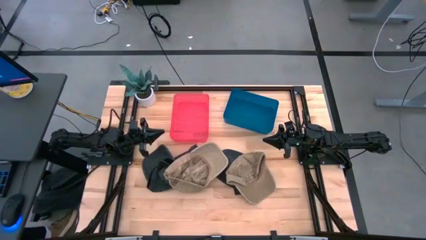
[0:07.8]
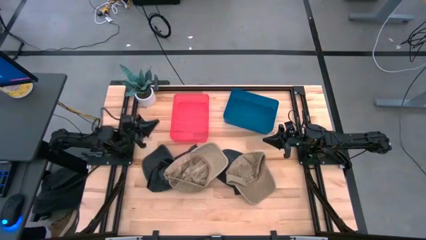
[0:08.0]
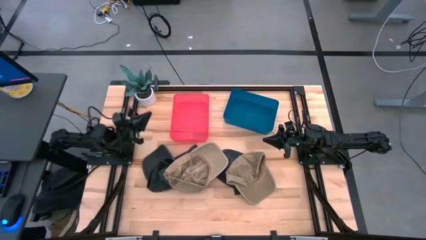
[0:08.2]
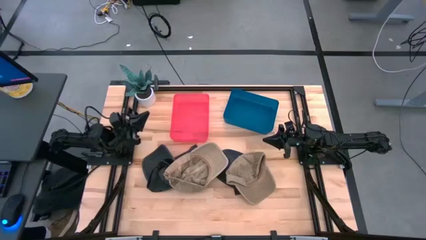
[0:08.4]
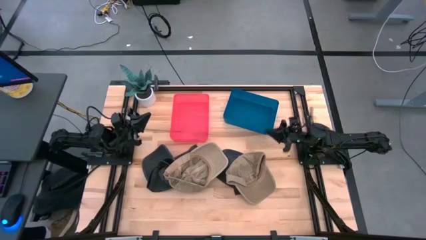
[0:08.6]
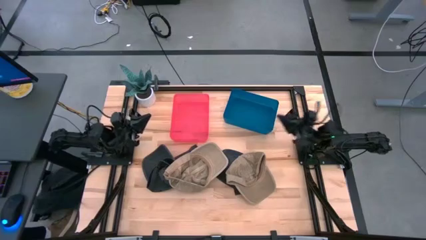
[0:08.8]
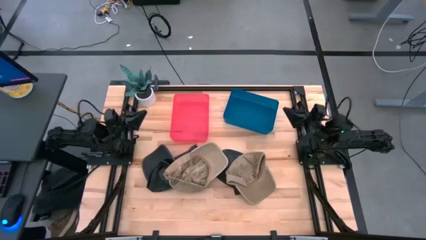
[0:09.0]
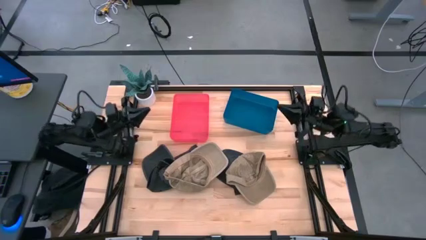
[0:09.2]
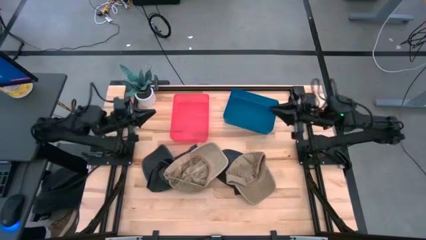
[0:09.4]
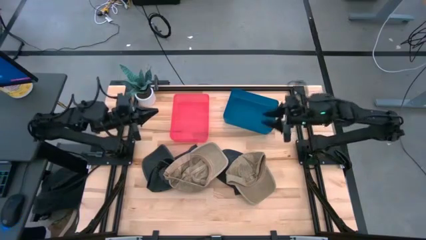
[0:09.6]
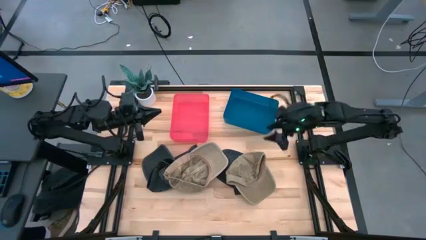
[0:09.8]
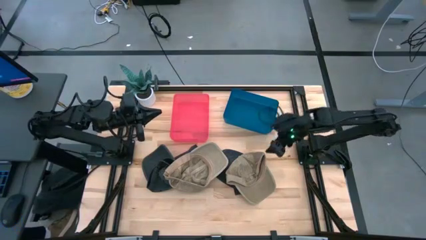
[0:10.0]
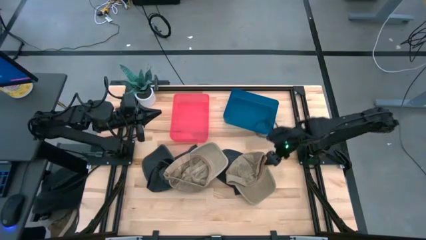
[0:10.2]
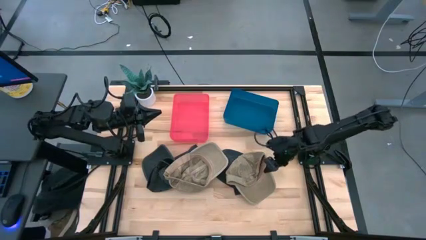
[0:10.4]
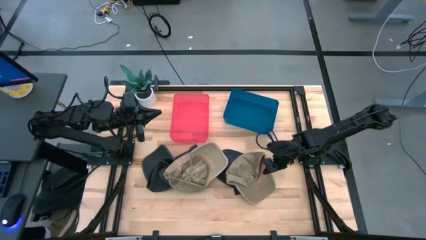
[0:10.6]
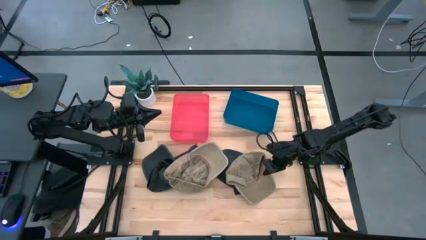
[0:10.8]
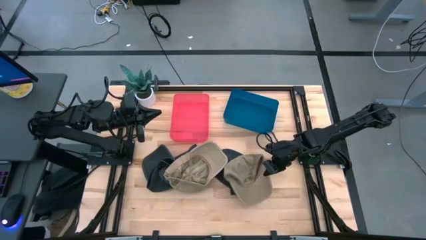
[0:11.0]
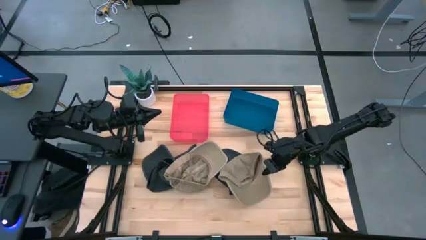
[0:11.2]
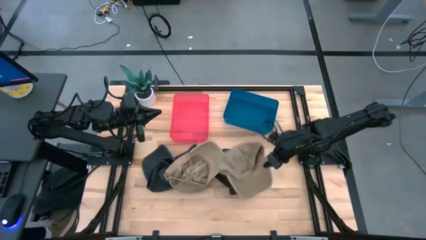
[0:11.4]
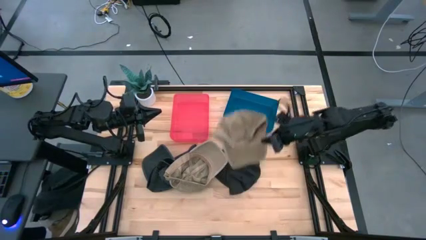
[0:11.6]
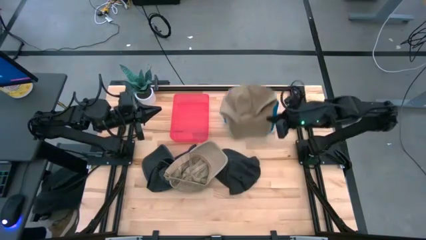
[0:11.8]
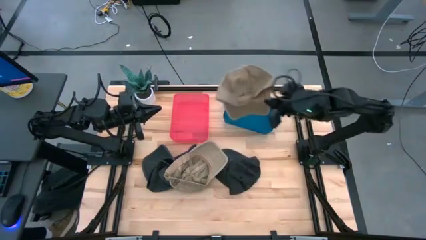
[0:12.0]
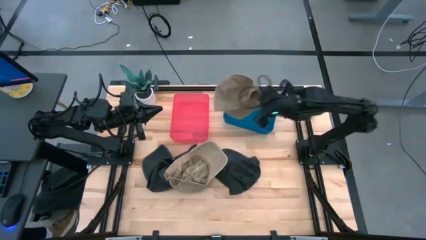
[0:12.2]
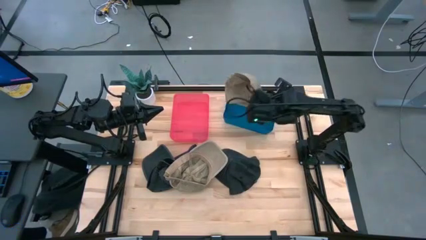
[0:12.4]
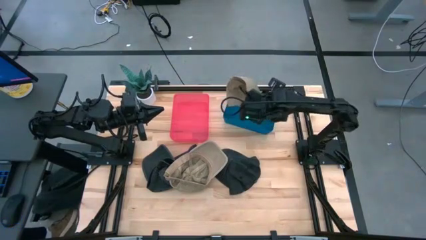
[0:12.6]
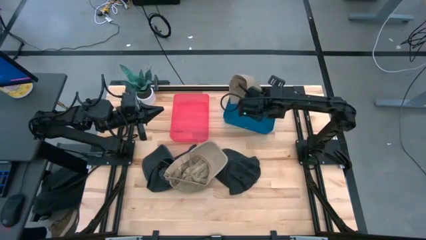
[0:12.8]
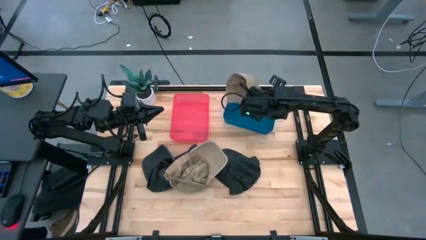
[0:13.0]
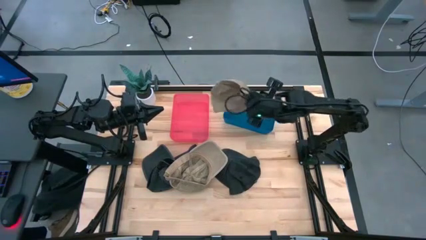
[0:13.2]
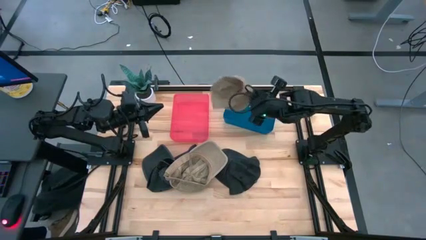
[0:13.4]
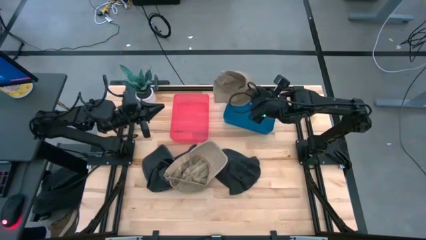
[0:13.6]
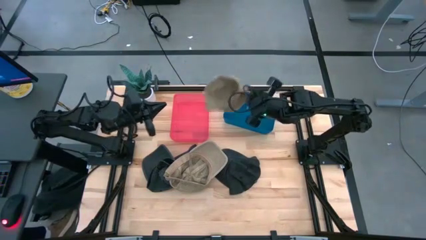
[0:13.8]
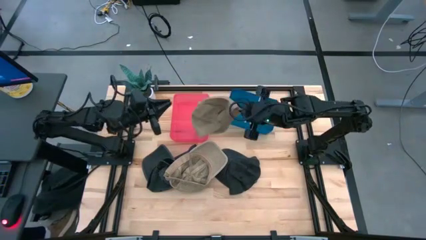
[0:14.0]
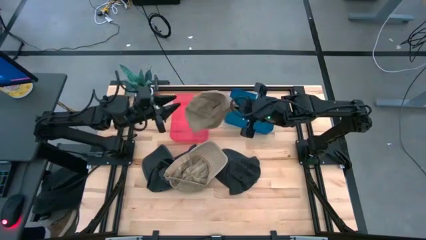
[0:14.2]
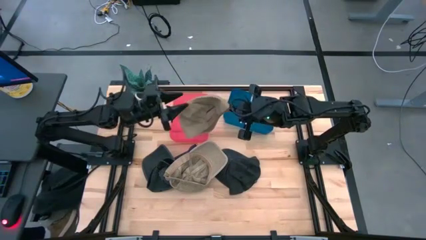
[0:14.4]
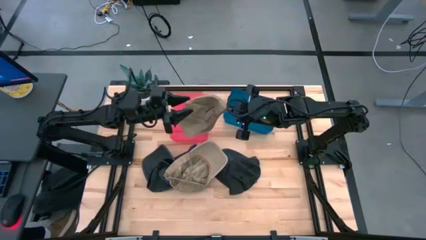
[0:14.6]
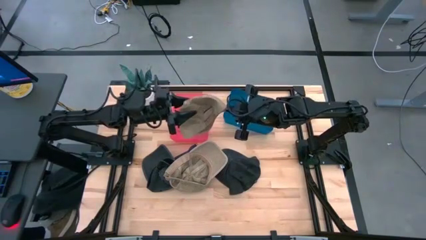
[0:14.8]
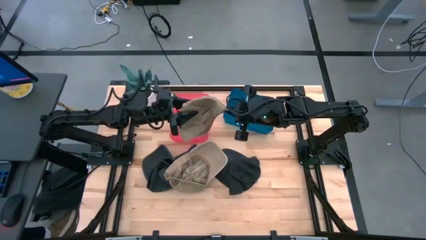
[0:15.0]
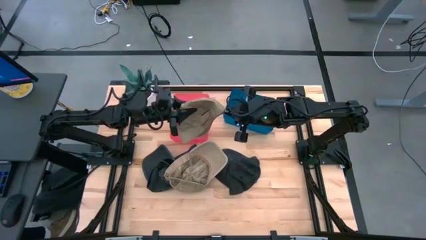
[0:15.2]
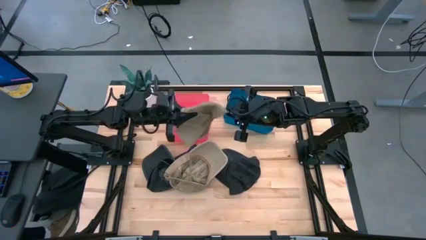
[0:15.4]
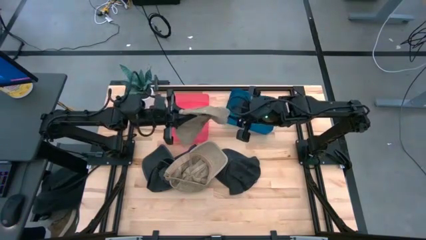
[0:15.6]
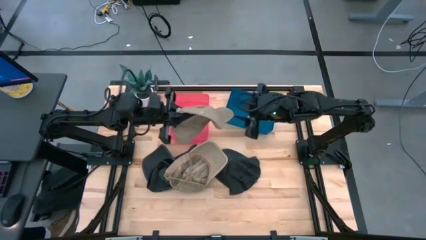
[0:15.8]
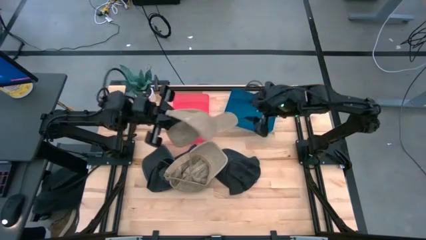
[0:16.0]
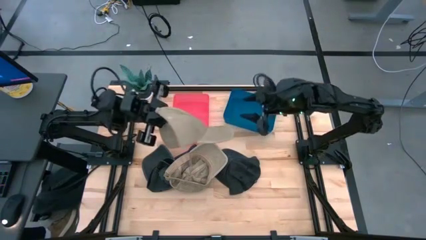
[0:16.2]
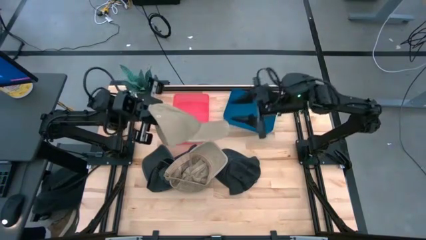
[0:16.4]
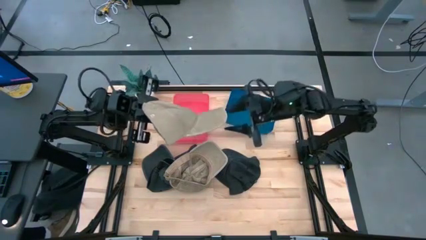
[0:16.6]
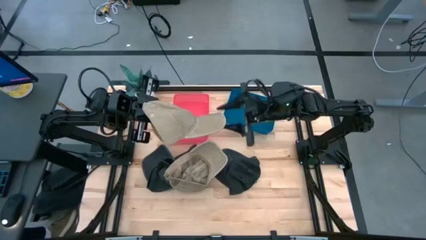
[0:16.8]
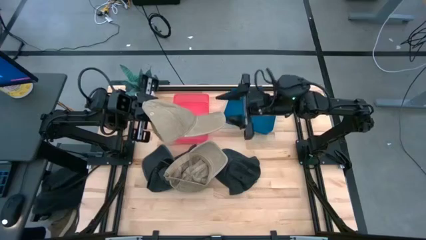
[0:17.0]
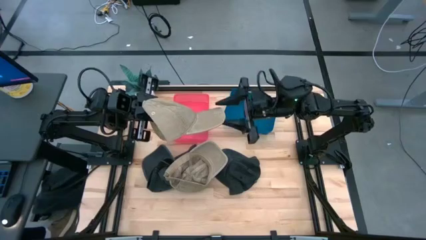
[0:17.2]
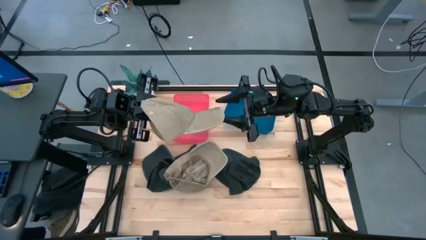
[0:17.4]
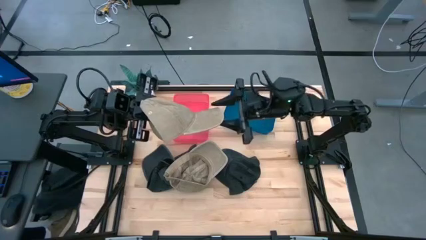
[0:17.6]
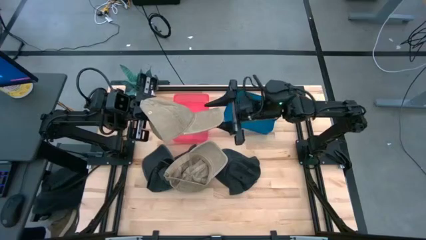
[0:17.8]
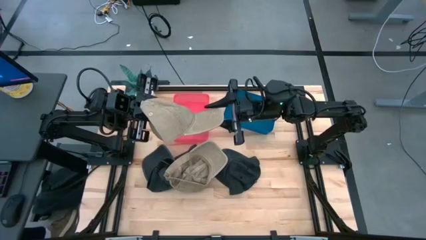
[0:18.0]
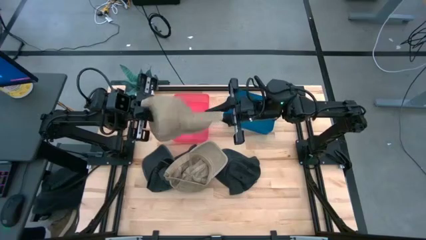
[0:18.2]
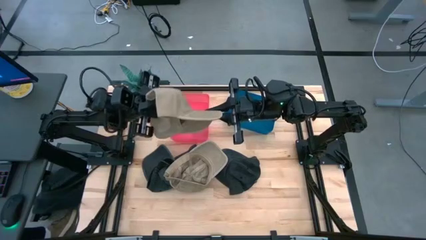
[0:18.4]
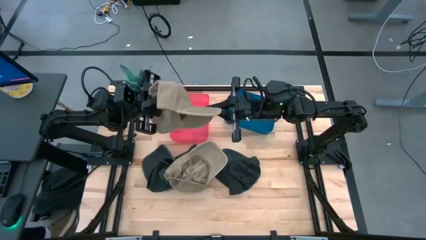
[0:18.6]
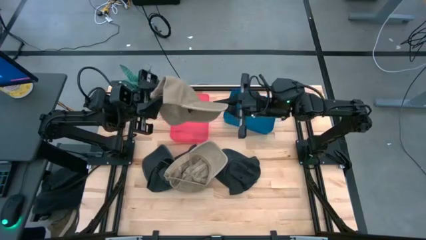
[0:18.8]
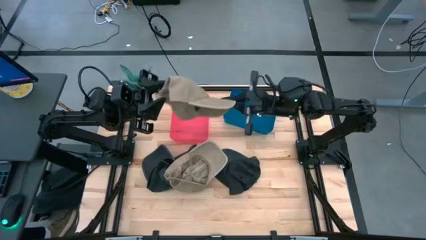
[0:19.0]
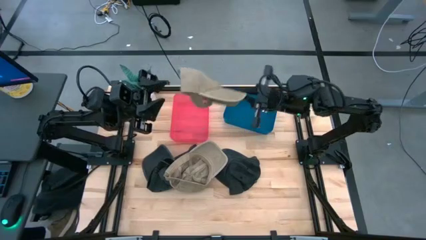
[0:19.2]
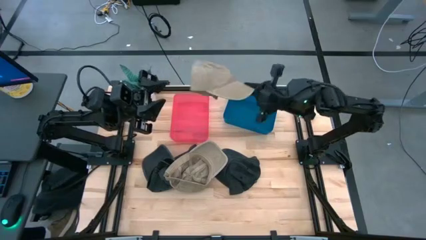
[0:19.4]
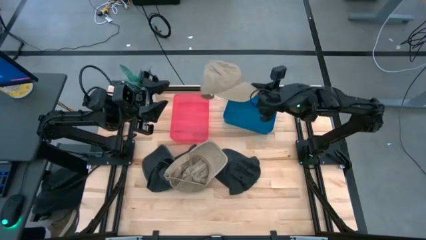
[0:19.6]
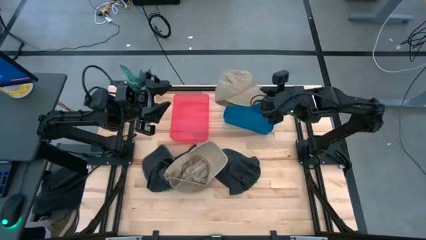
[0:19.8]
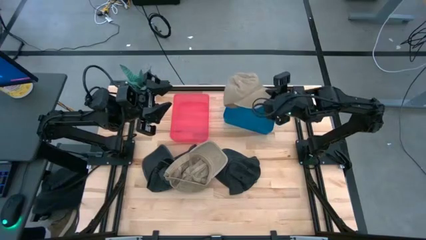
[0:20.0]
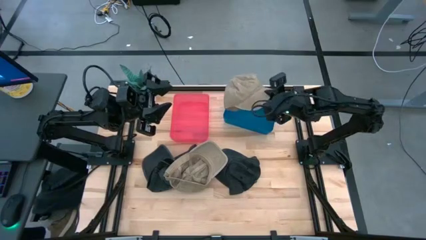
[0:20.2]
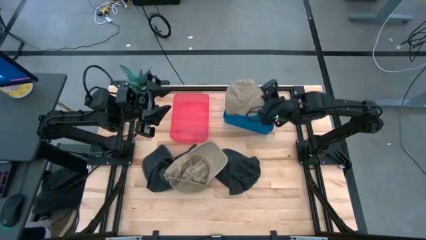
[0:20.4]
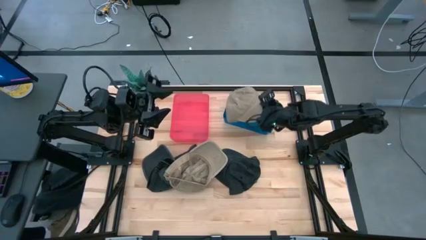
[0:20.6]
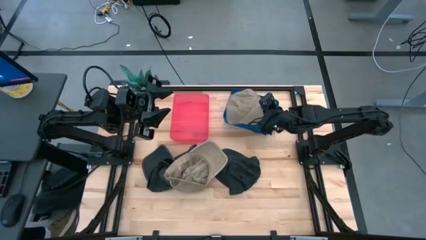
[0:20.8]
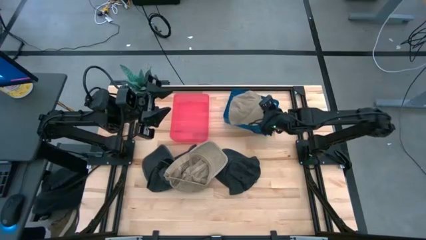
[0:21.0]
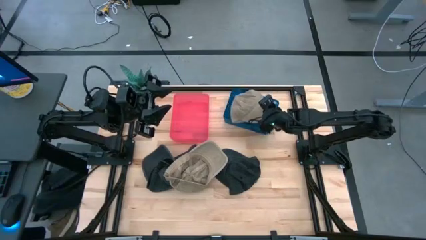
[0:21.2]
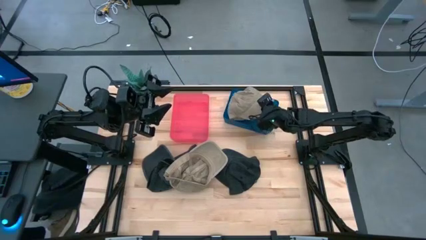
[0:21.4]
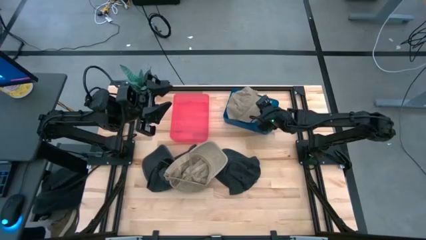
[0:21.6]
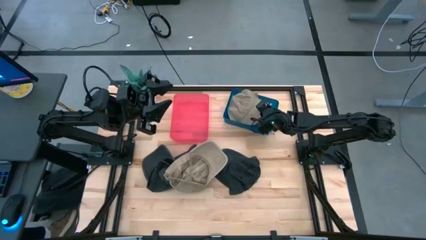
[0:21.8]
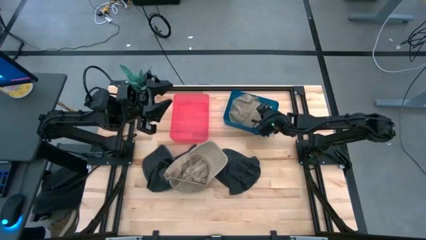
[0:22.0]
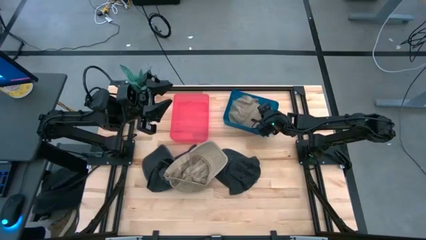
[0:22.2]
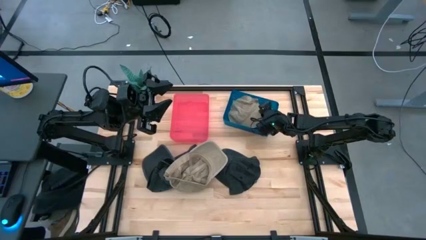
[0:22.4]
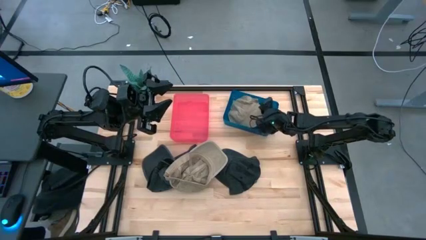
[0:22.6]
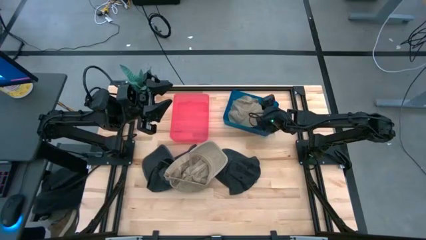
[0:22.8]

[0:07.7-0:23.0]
Task: Pick & Place hat
Put the right brown cap into the blue bin

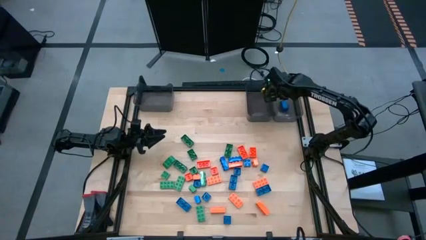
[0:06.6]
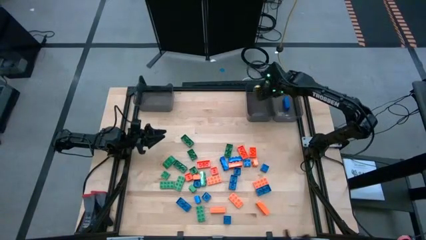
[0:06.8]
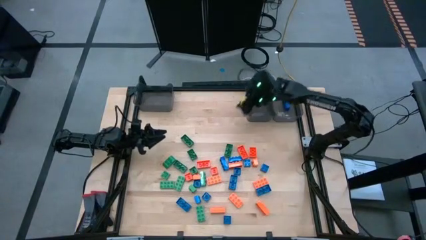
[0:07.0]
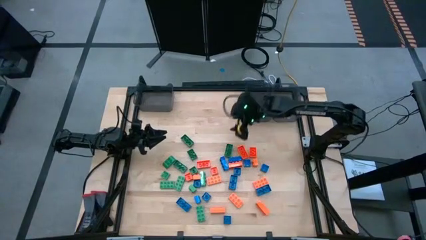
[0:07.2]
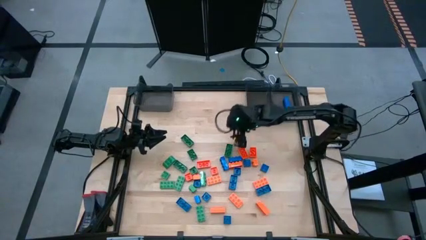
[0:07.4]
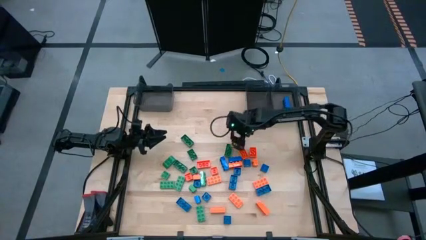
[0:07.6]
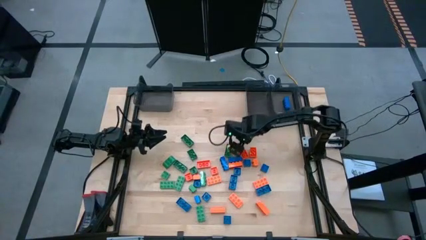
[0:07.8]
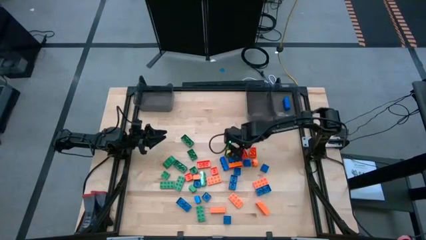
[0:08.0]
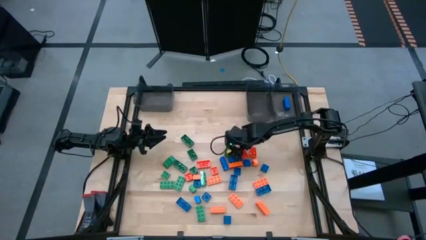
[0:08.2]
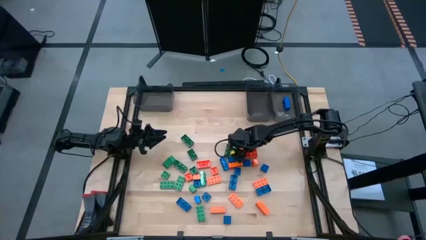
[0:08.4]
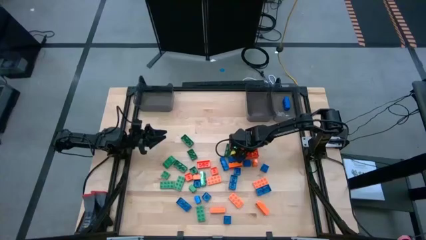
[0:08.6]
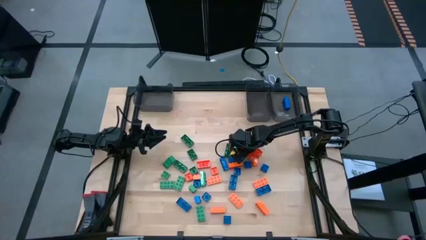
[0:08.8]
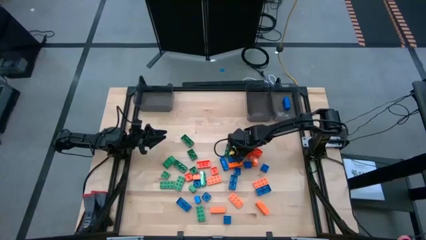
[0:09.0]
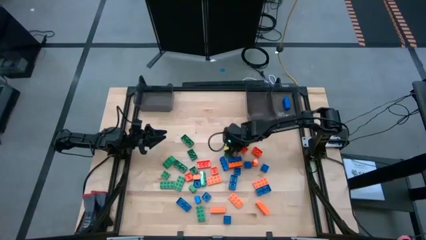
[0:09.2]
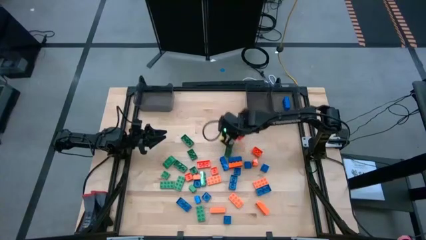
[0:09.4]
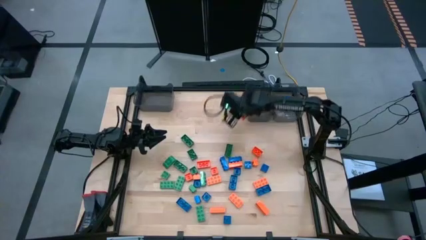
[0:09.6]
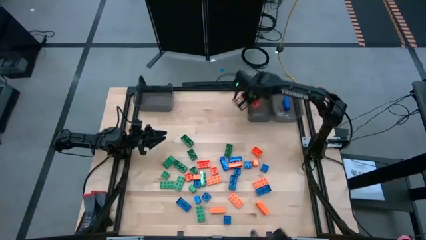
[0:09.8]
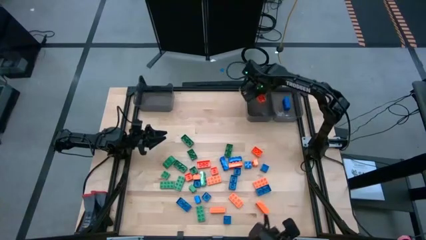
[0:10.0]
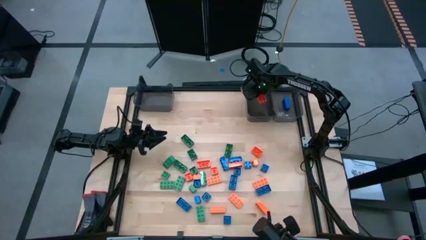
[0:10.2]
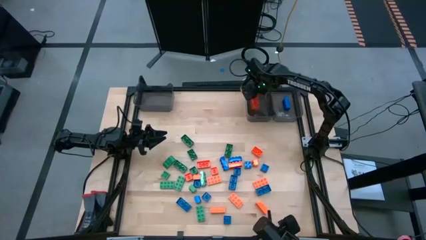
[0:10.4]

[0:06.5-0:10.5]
Task: Sort blocks
Put the orange game piece into the middle black bin
